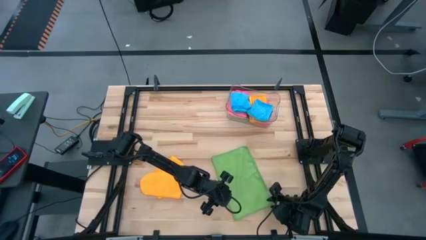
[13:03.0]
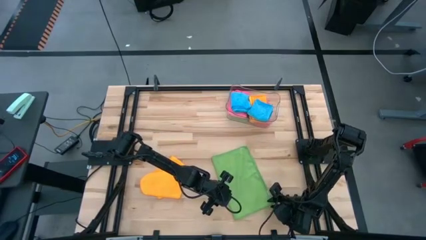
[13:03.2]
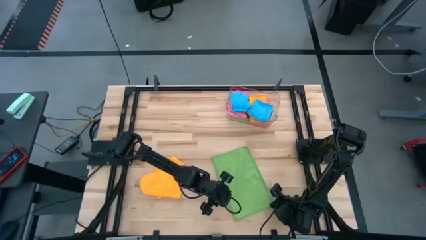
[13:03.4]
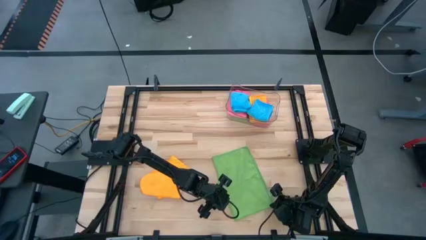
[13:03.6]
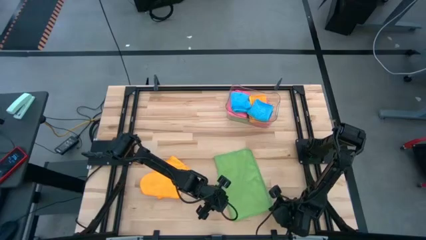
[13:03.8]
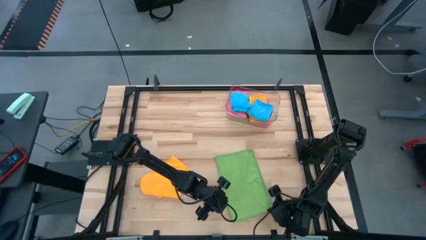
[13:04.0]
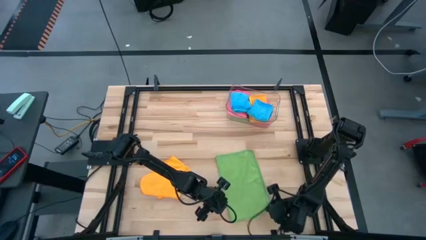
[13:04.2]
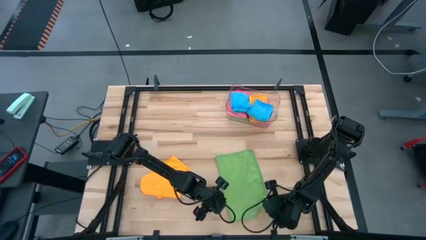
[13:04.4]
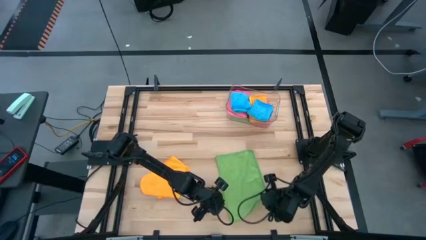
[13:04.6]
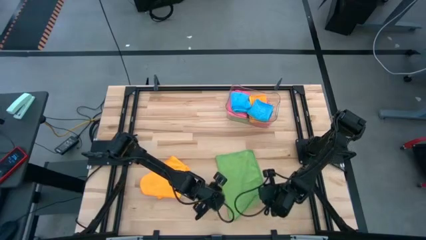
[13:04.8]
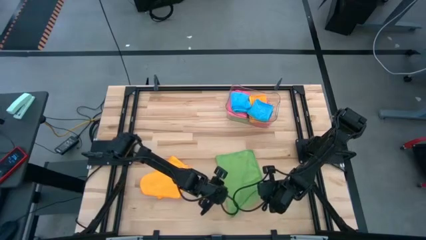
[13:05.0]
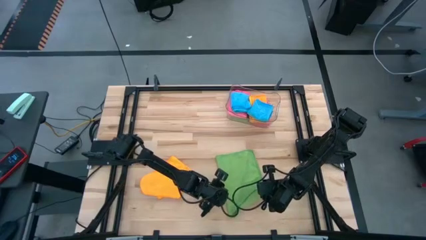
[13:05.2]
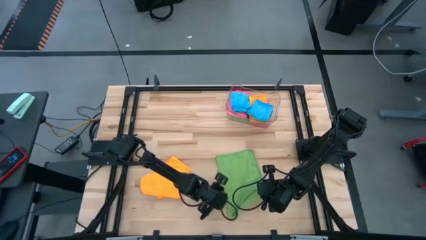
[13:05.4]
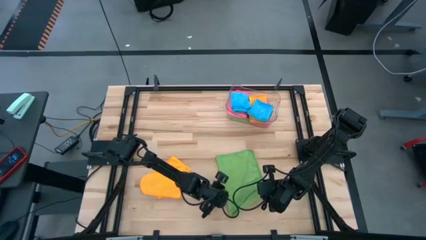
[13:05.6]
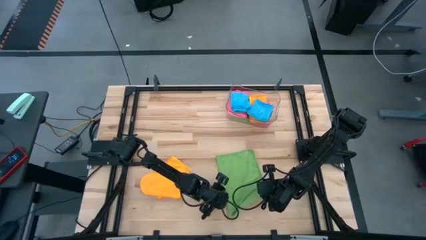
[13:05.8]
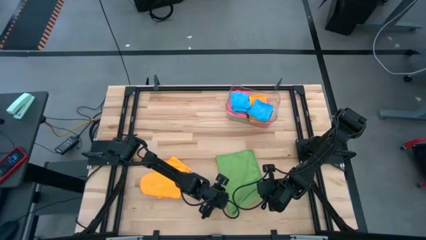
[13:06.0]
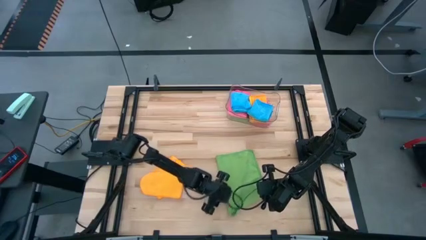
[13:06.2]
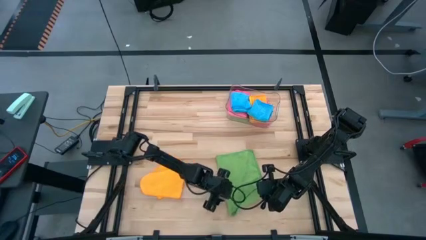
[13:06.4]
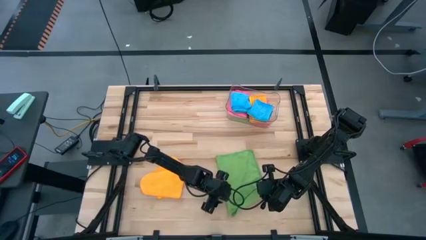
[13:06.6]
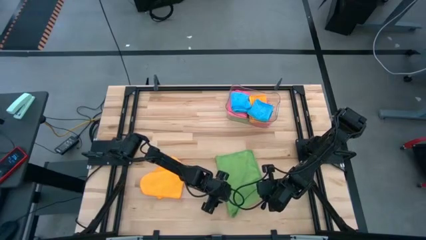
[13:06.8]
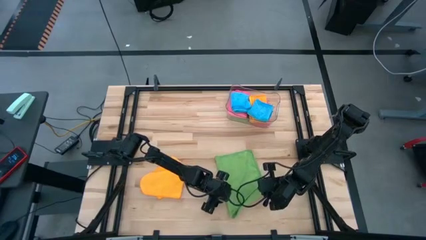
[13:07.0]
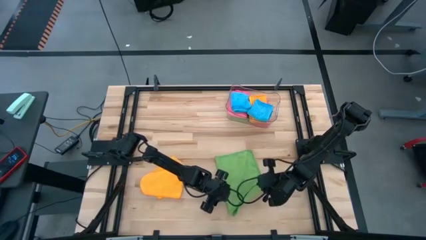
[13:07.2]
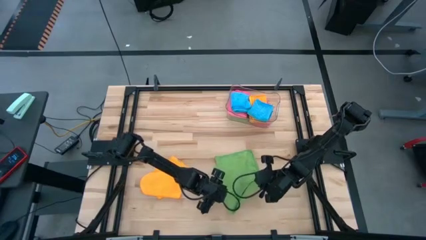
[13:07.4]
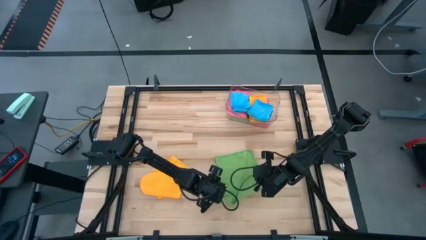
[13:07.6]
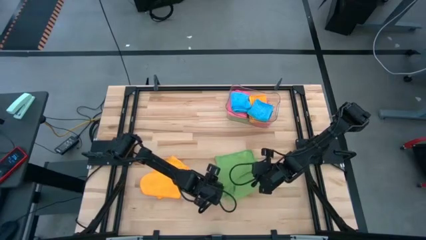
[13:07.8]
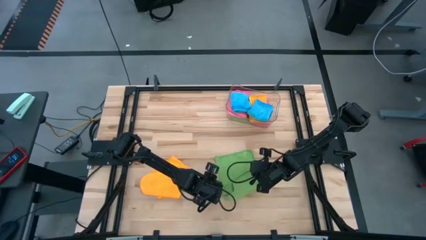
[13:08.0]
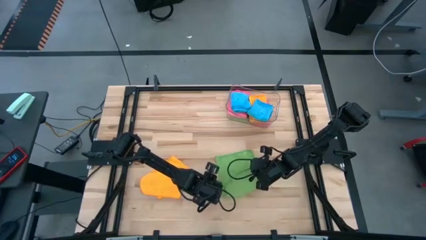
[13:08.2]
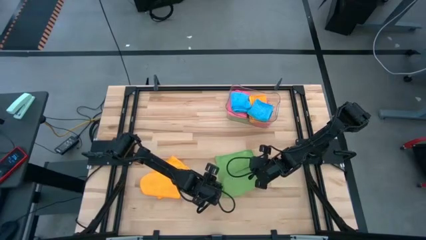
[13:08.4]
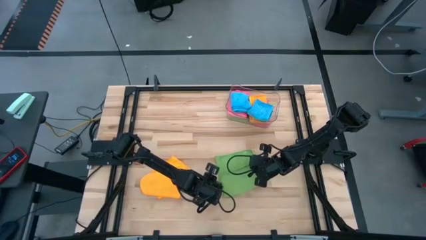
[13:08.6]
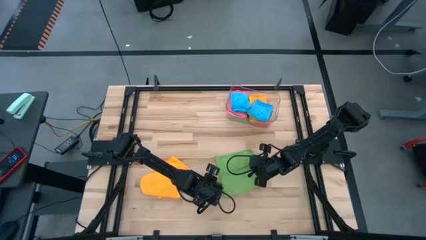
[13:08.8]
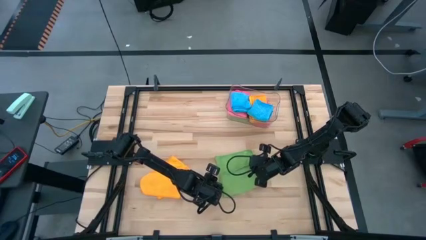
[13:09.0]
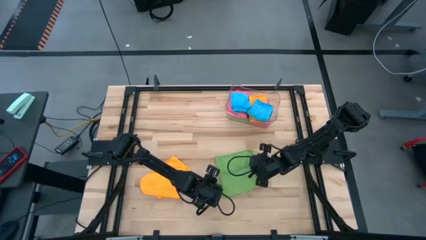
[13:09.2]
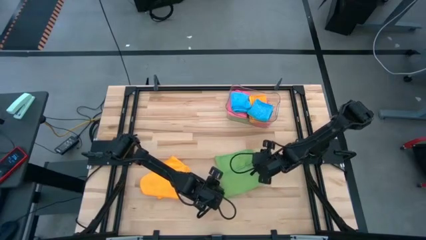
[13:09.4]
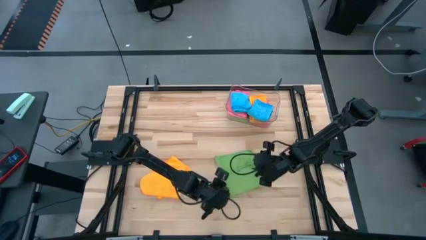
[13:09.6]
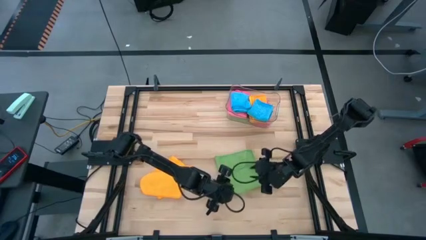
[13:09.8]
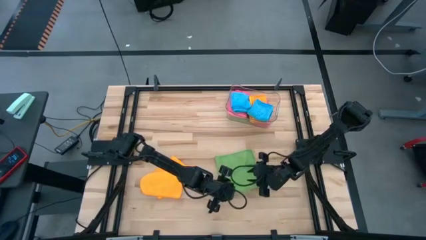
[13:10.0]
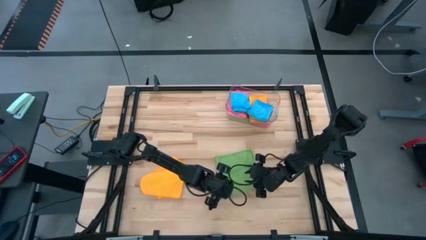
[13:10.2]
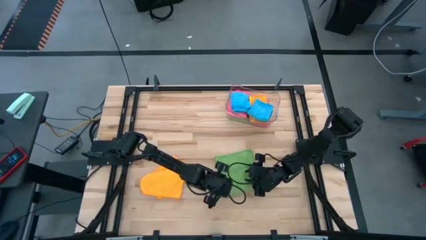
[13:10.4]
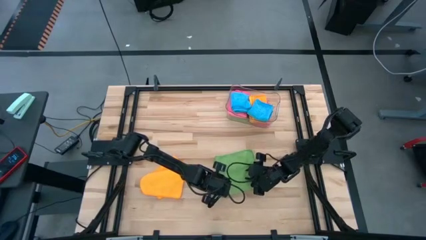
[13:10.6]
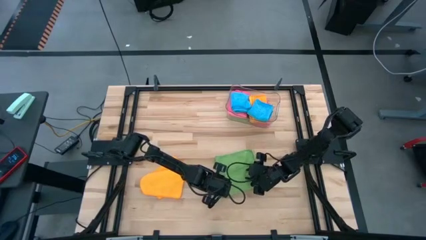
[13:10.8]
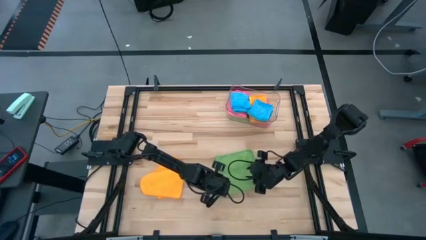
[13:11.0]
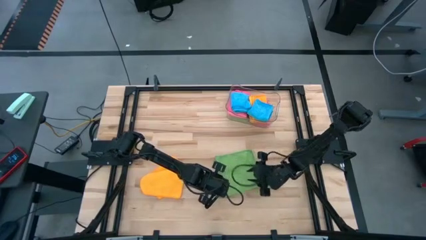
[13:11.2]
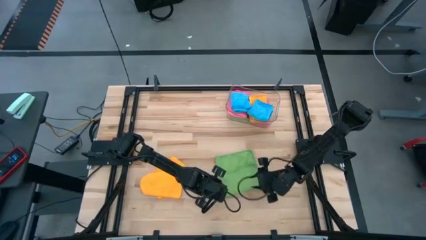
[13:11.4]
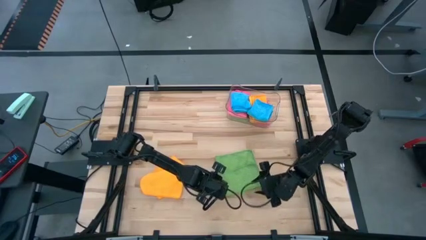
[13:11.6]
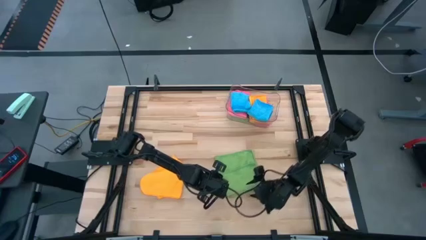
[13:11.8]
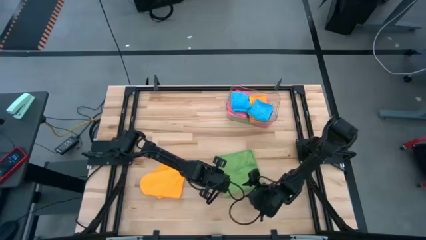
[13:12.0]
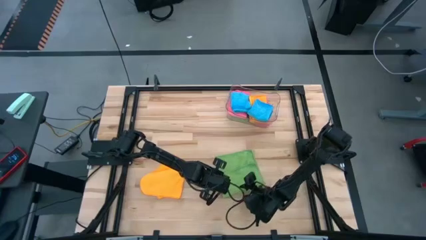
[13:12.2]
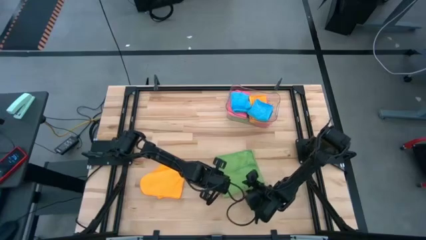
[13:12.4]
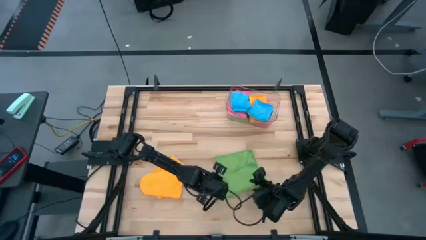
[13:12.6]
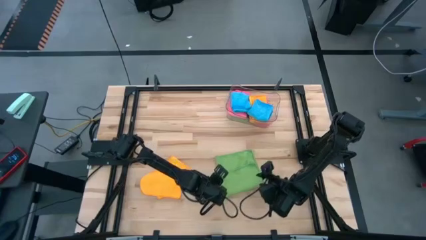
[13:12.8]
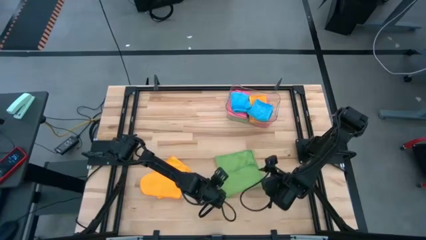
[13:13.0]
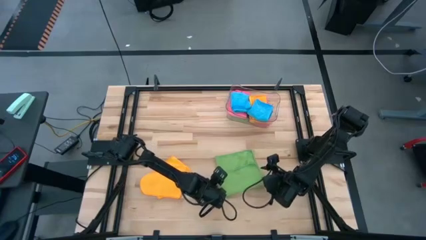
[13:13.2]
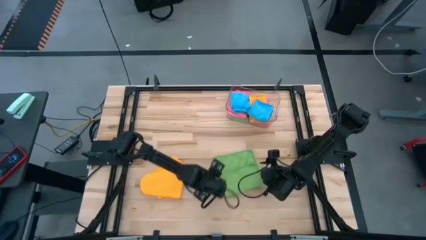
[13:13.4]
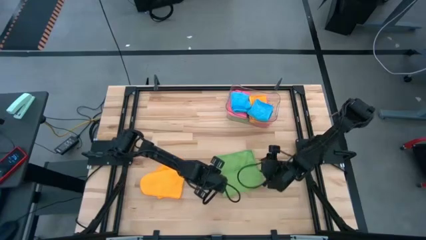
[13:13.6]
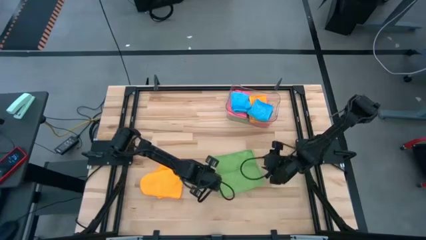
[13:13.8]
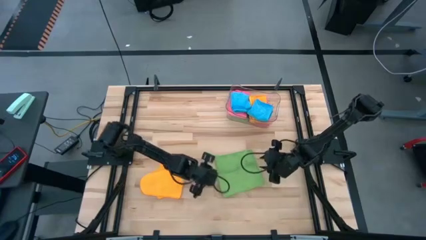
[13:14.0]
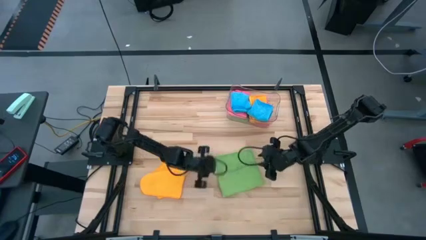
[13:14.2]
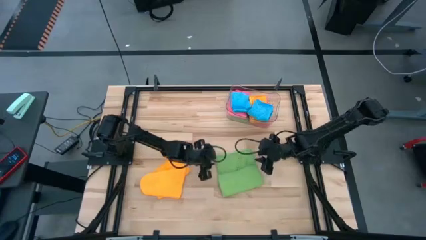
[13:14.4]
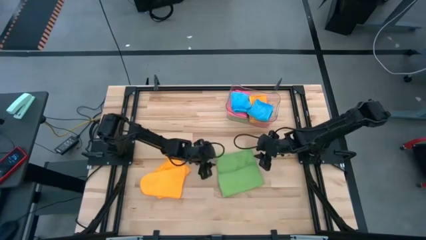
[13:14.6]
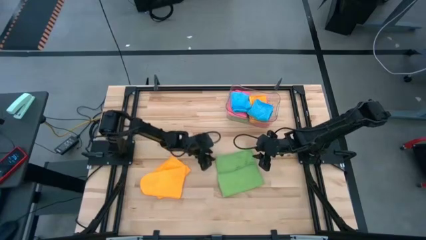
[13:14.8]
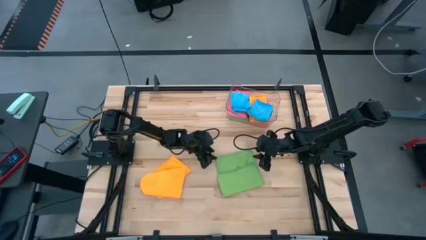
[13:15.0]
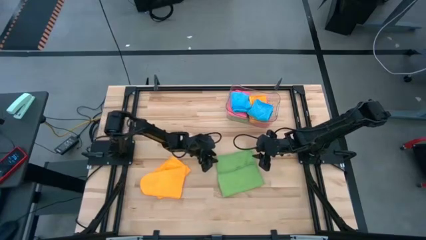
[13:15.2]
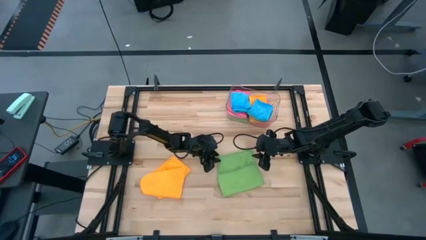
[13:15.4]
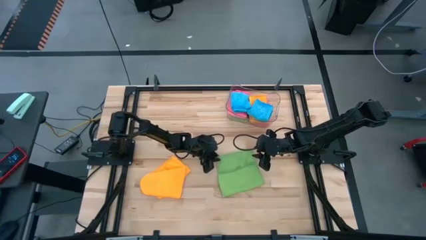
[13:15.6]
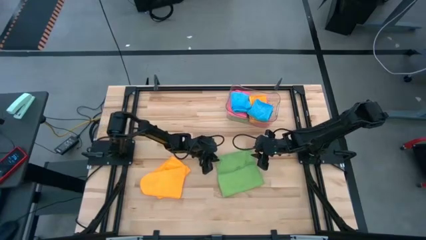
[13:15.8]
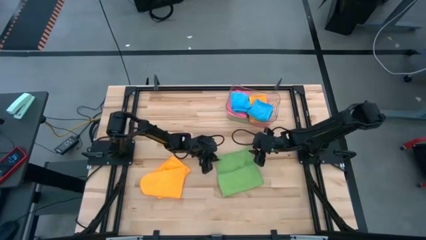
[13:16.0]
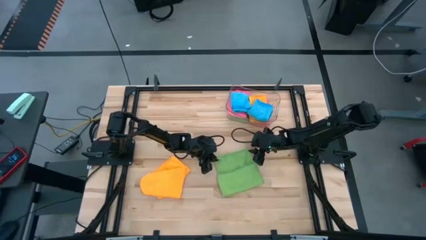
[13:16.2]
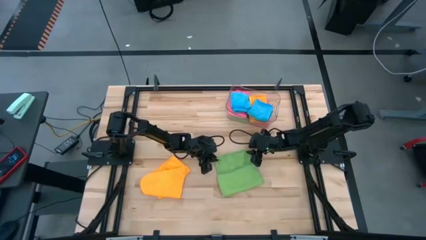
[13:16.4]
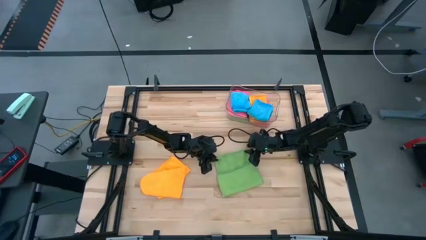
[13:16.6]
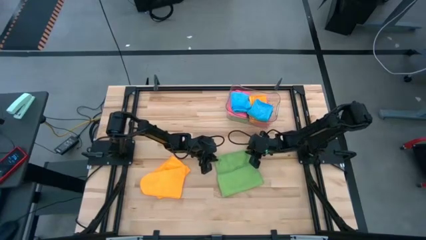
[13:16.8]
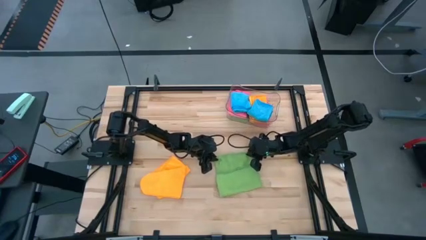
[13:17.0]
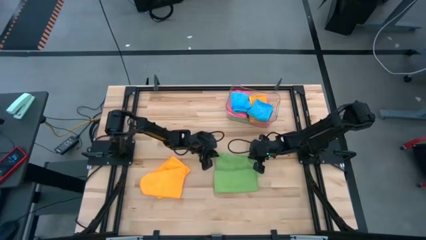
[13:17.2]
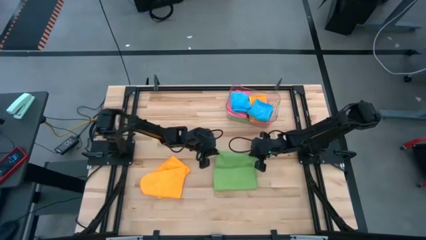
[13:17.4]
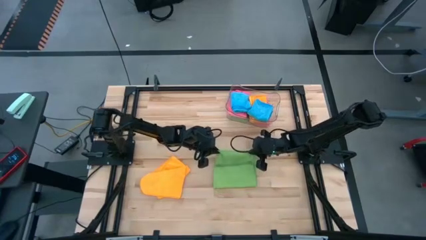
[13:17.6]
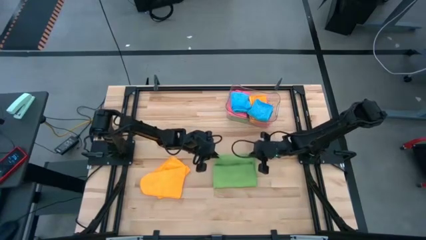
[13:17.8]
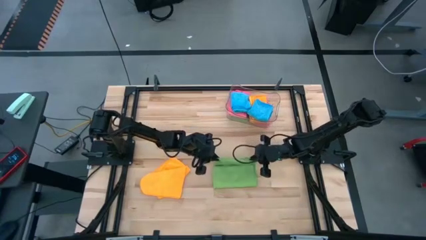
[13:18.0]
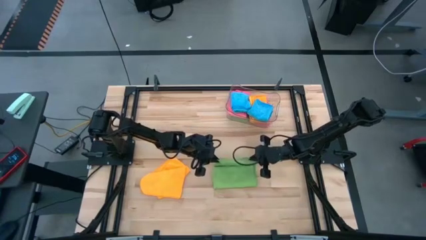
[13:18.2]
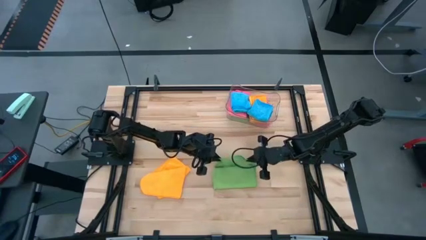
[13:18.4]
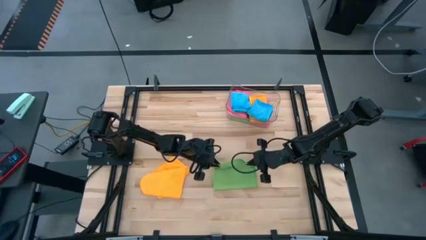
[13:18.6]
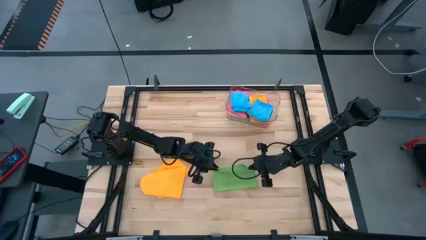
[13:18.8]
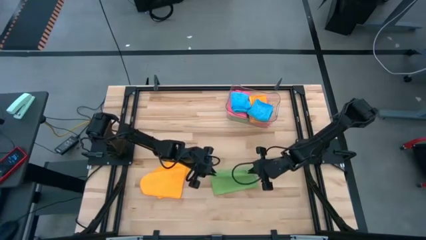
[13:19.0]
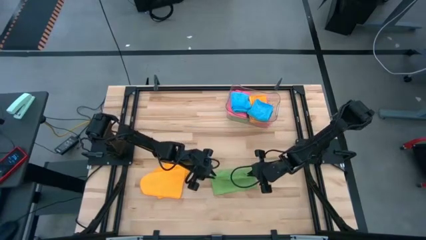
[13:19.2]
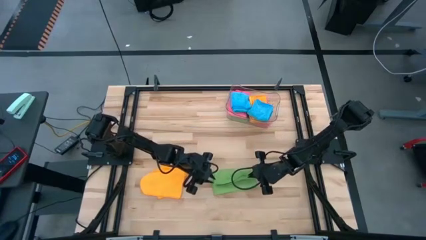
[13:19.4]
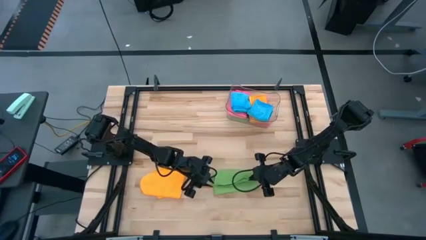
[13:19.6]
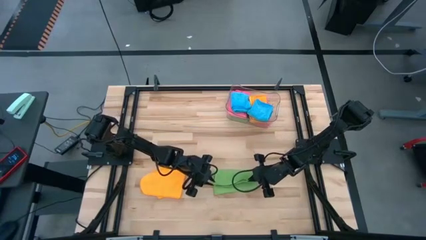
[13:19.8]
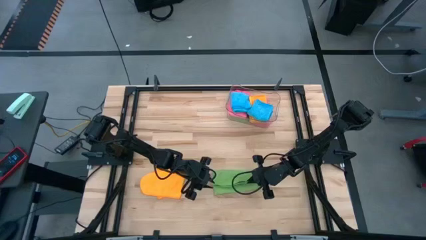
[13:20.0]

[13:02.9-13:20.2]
Task: Fold microfiber towels
Fold the green towel
